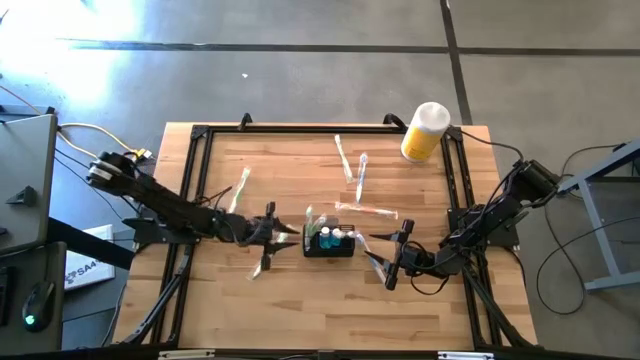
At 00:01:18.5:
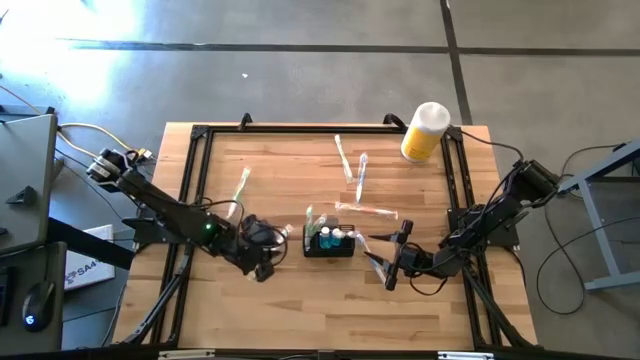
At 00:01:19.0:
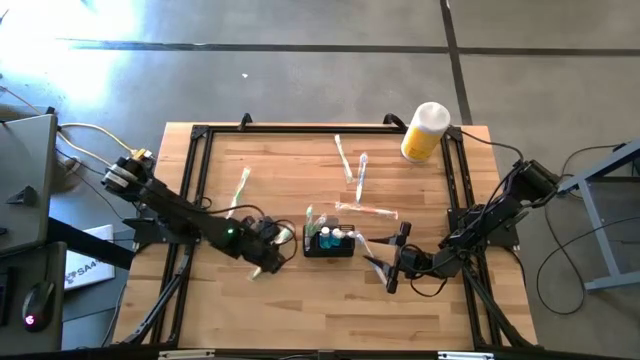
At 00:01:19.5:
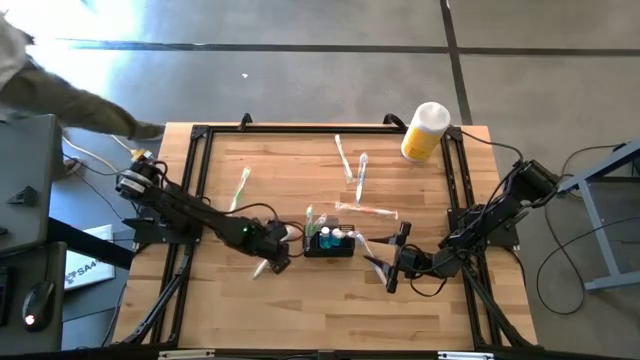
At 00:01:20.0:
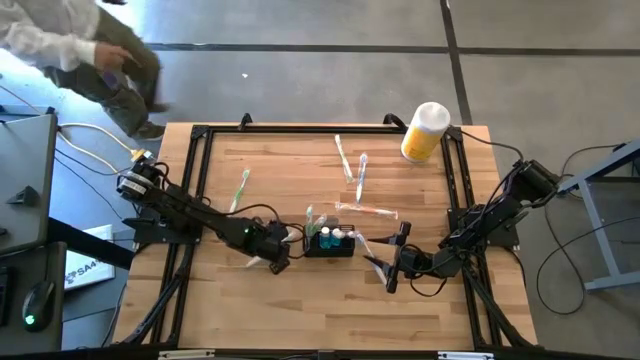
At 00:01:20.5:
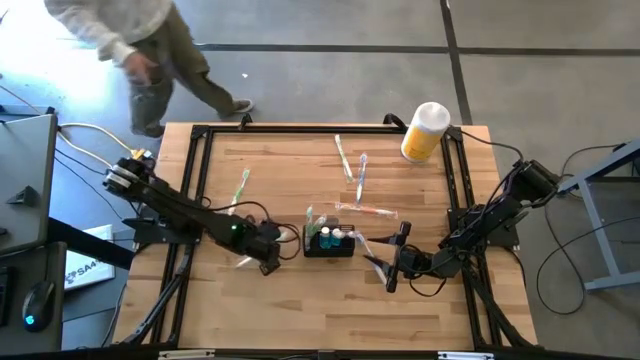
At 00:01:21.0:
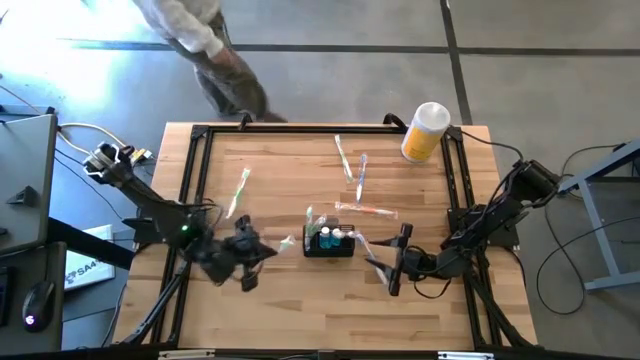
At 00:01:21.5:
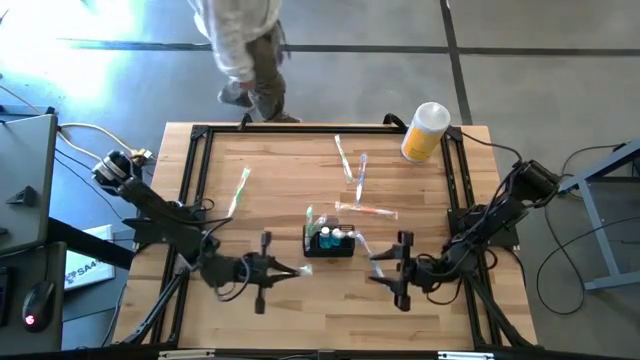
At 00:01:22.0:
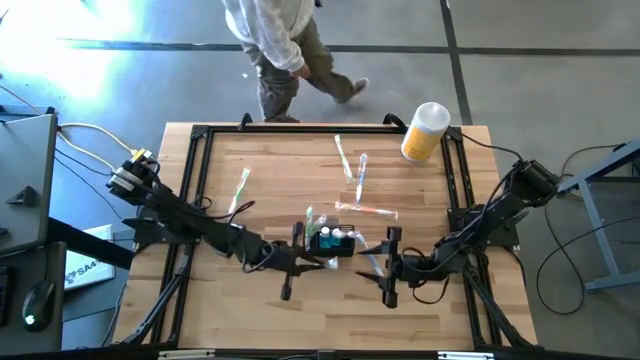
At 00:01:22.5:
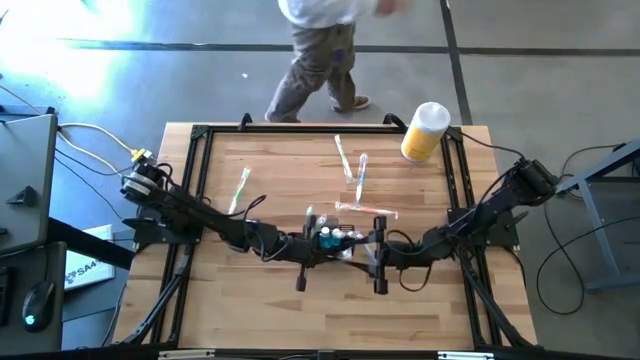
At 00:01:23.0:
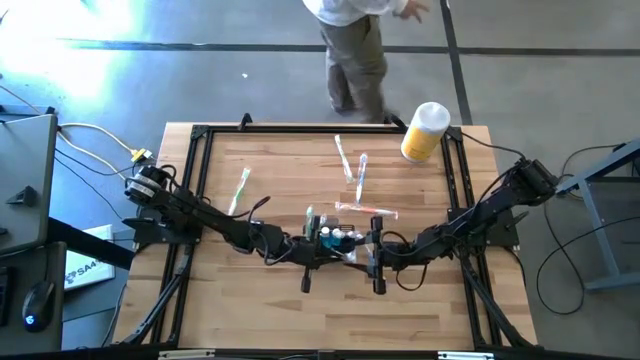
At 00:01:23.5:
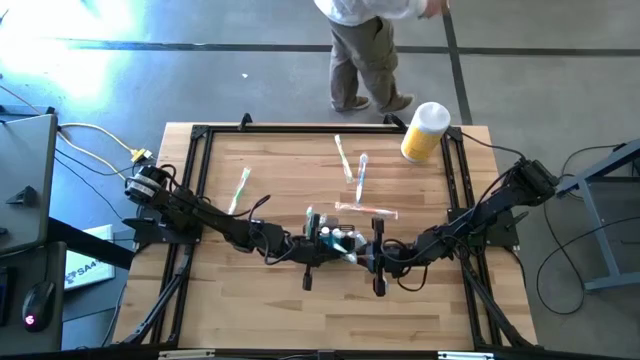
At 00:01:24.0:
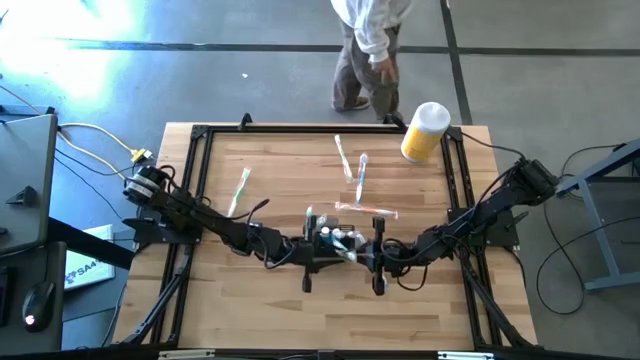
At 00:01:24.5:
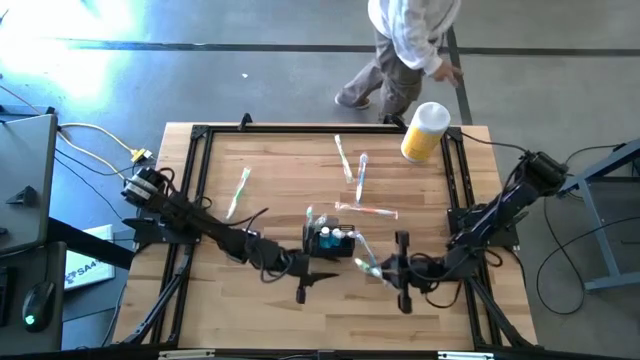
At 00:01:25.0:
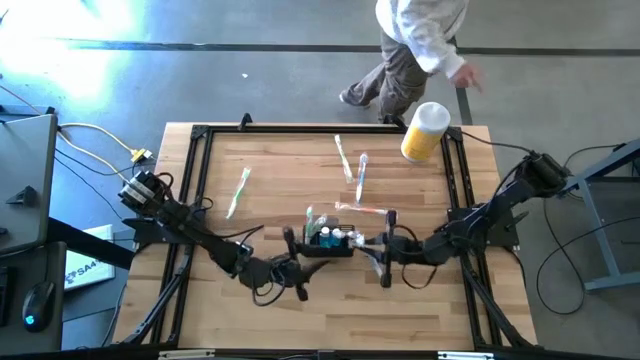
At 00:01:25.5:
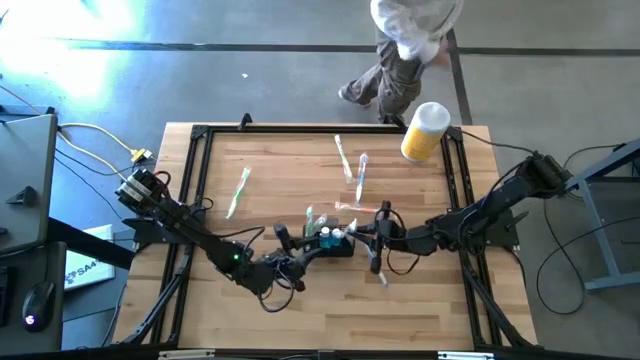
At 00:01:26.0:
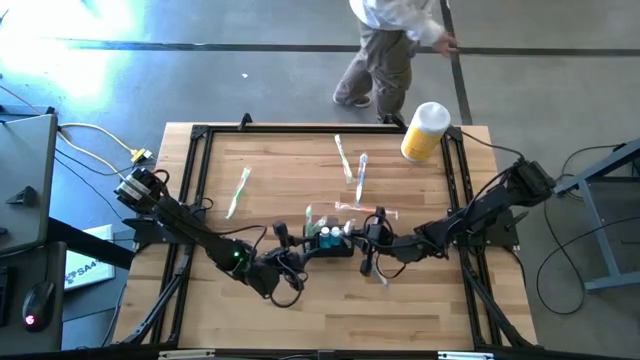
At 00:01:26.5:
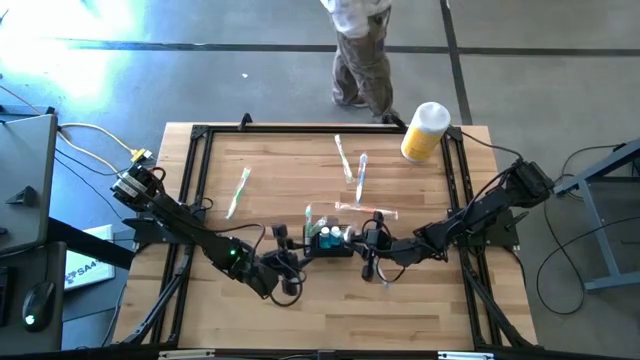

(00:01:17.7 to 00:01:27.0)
Task: Pick & Place toothbrushing station
Put the bottom green toothbrush into the wire organizer

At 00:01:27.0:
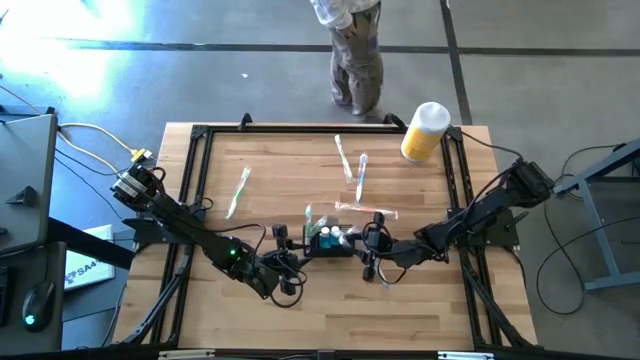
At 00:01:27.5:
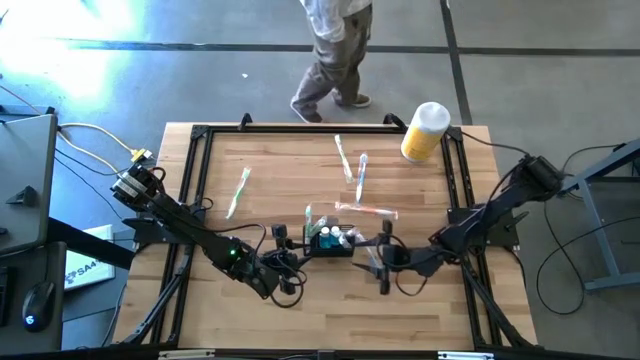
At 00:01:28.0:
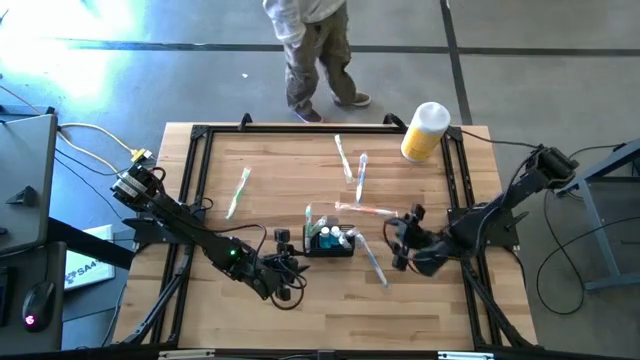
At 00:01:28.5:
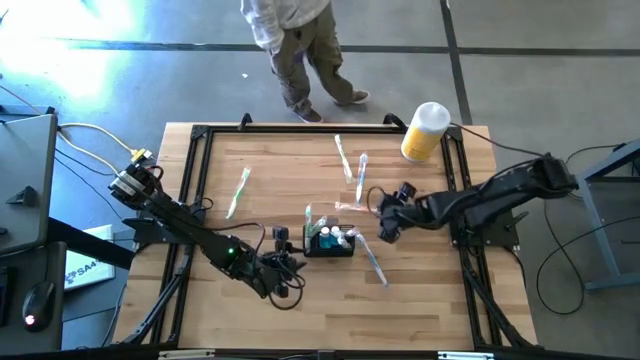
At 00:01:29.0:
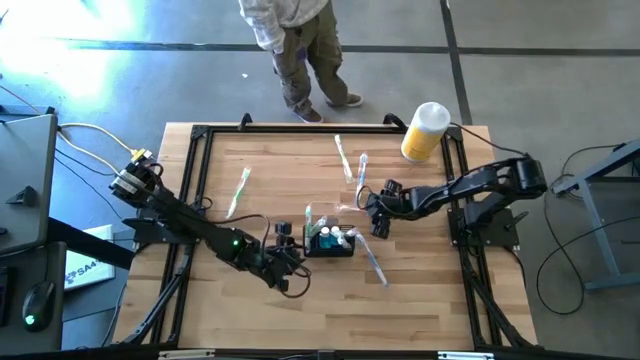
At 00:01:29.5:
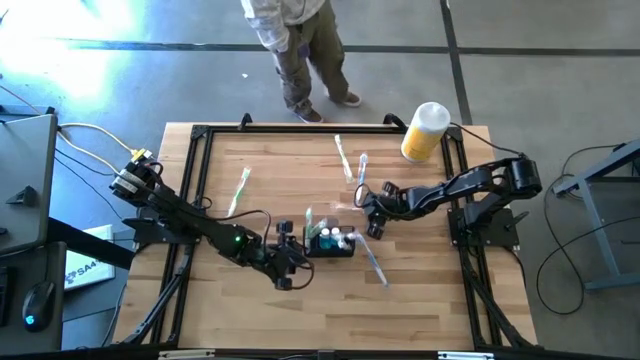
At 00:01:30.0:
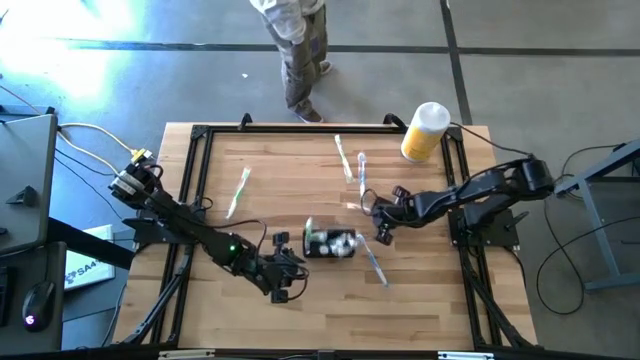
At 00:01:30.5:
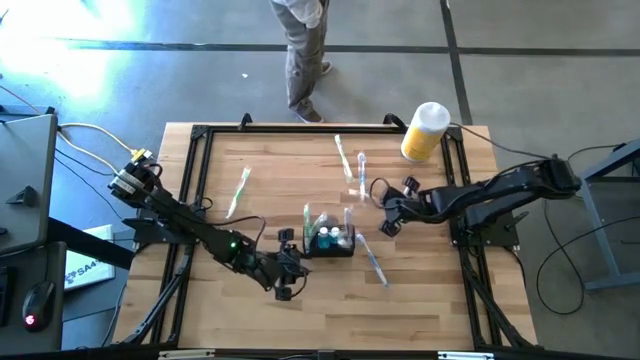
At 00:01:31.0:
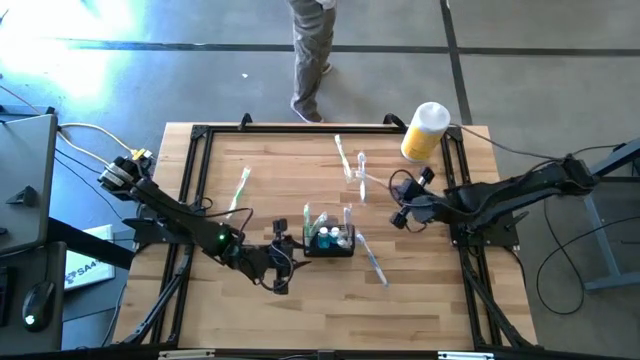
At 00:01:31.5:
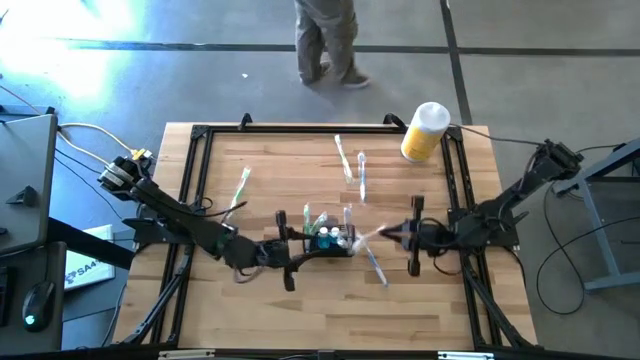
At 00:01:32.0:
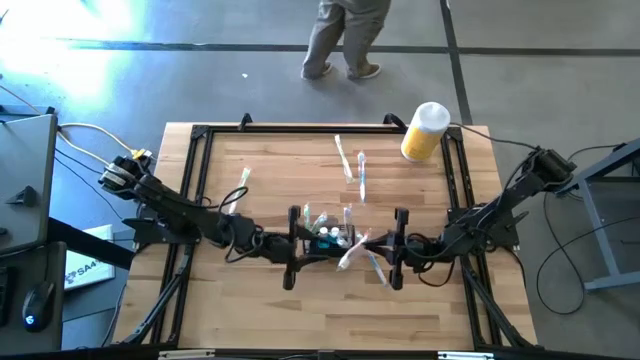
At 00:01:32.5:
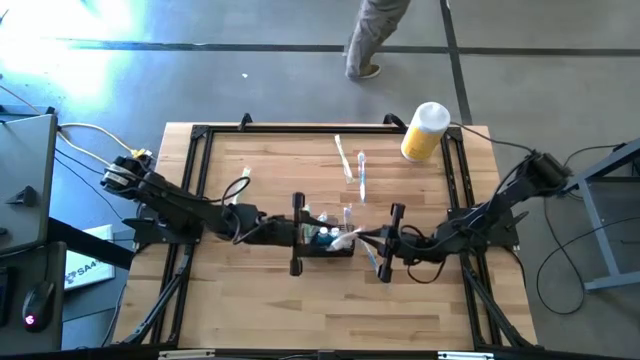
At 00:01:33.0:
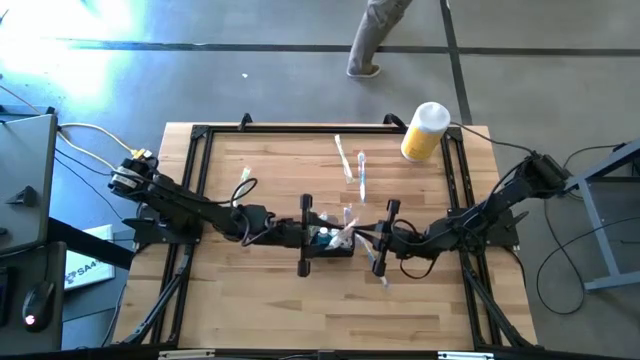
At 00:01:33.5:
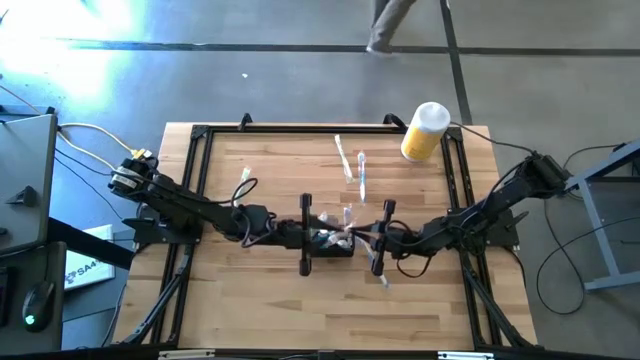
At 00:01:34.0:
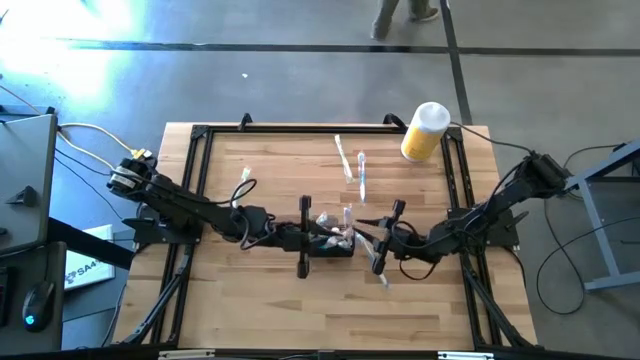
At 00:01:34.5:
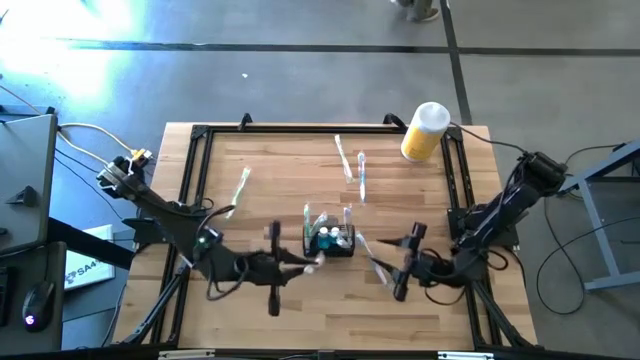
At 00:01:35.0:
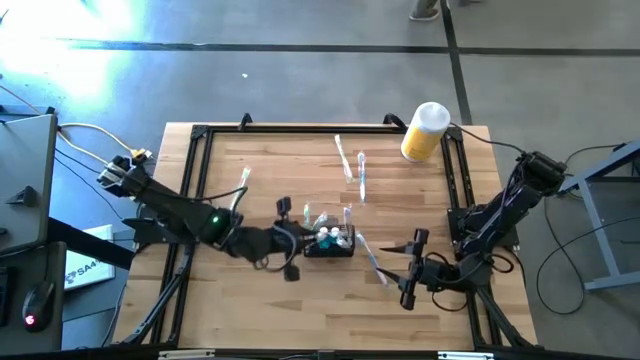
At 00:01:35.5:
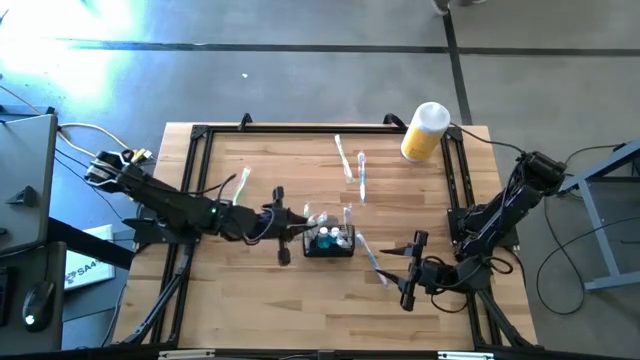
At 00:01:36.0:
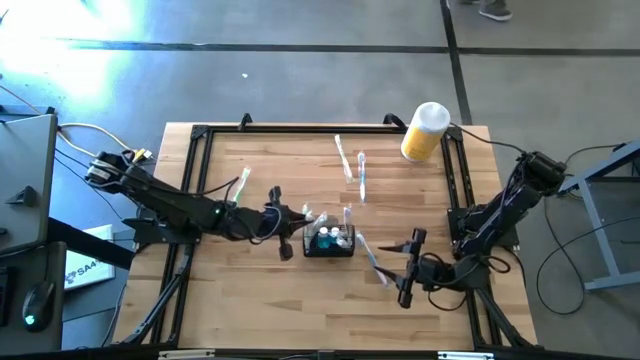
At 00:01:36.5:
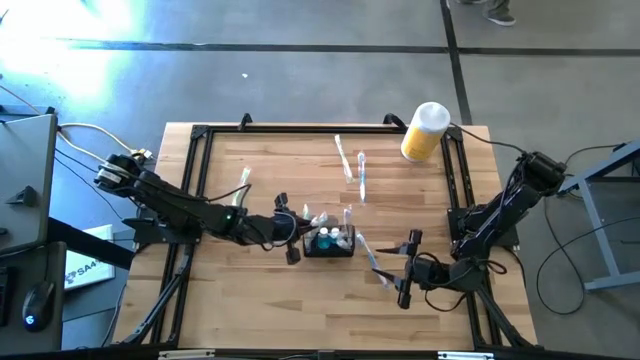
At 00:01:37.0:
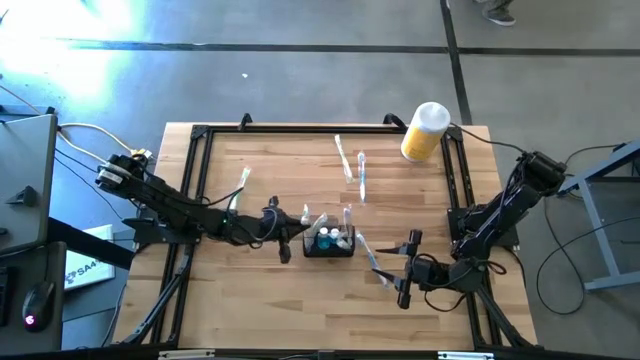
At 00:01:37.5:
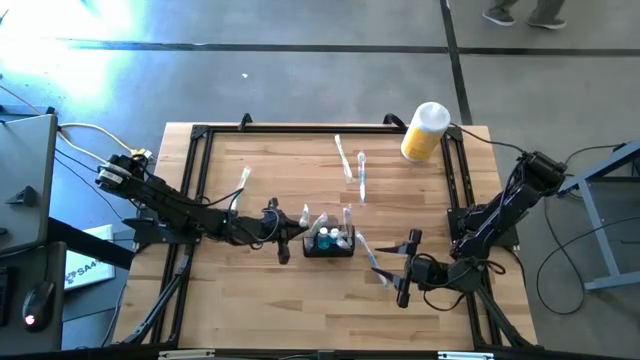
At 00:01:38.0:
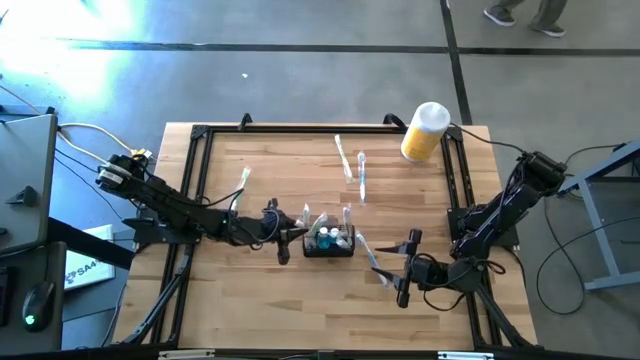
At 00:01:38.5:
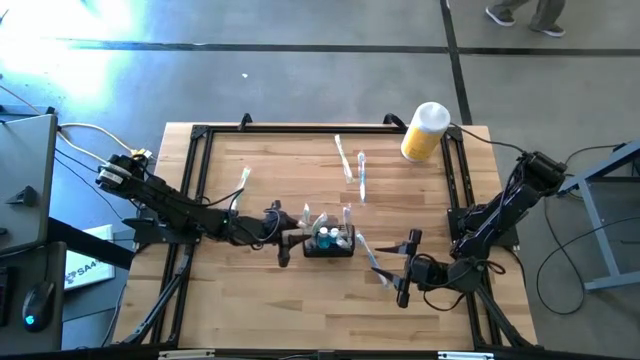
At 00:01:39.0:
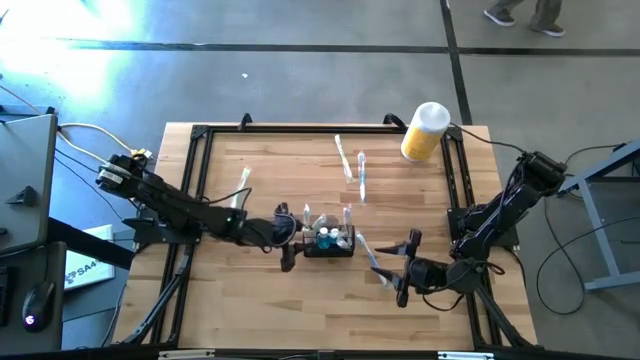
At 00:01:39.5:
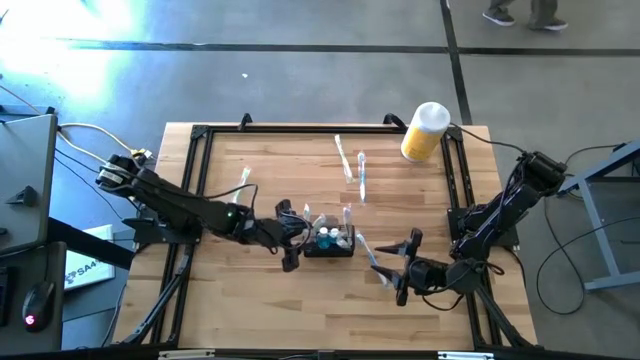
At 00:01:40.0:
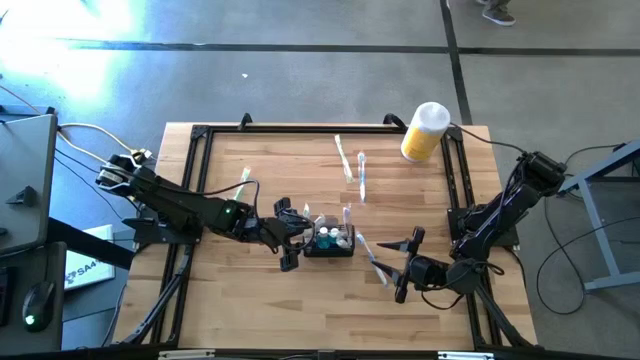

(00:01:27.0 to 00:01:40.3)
Put the orange toothbrush into the wire organizer
